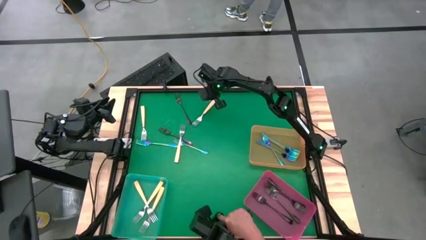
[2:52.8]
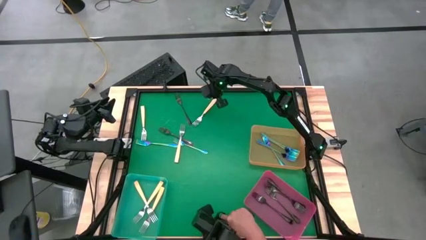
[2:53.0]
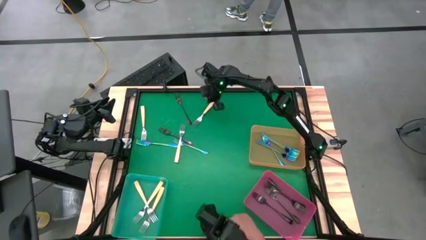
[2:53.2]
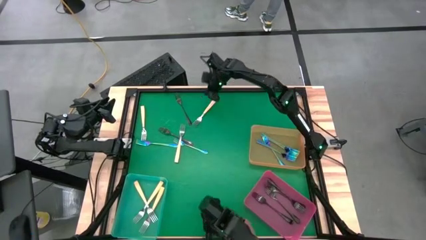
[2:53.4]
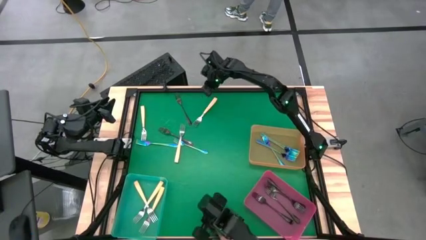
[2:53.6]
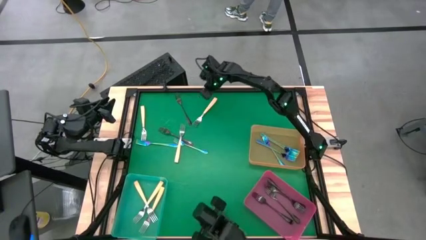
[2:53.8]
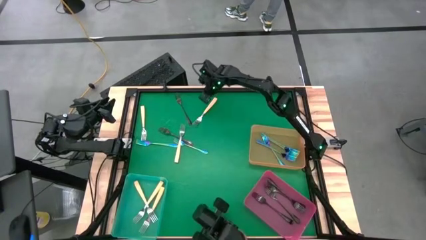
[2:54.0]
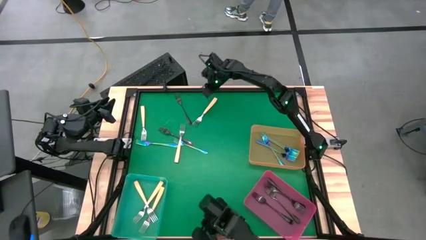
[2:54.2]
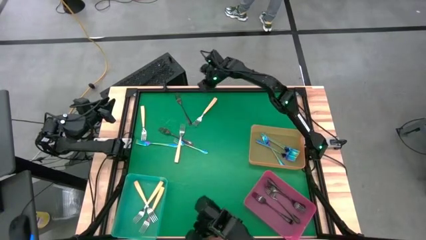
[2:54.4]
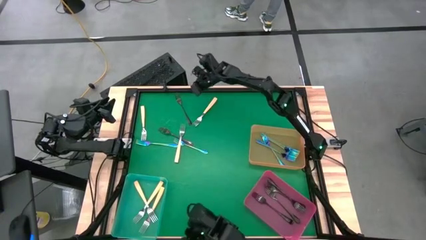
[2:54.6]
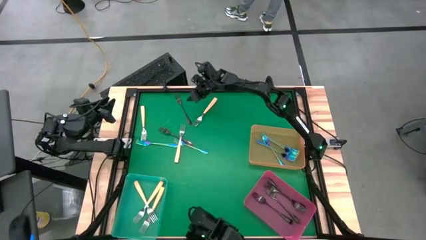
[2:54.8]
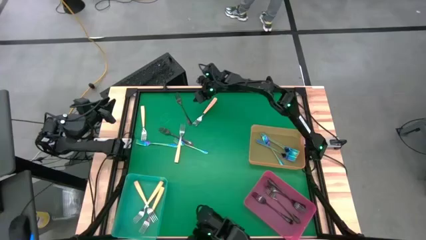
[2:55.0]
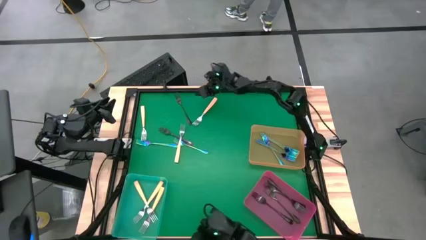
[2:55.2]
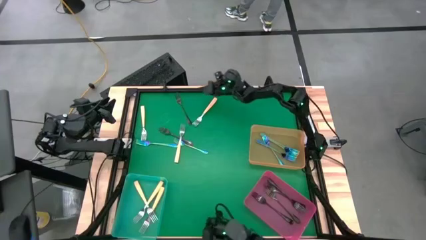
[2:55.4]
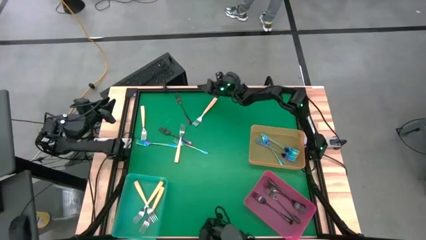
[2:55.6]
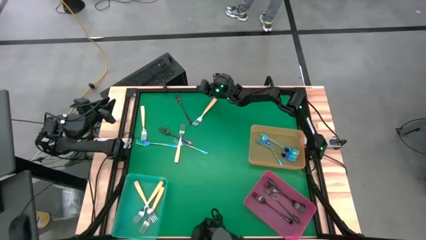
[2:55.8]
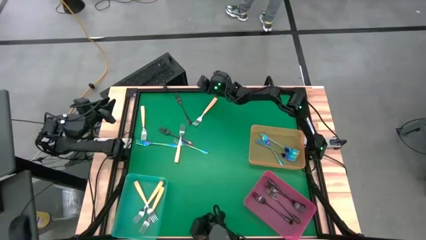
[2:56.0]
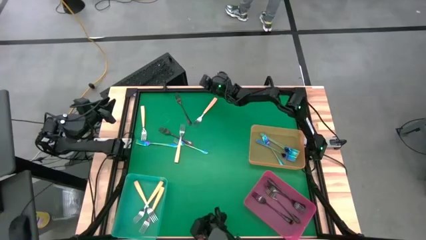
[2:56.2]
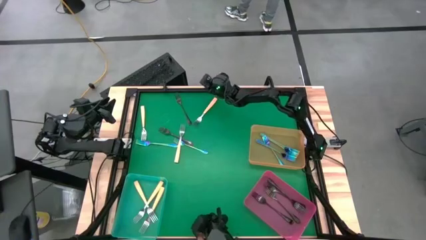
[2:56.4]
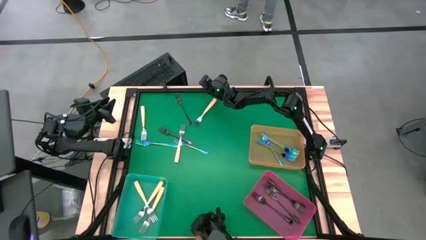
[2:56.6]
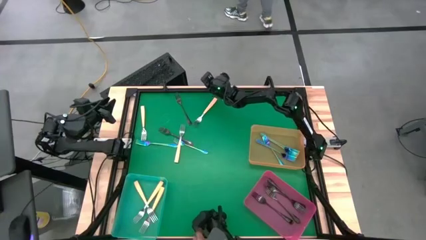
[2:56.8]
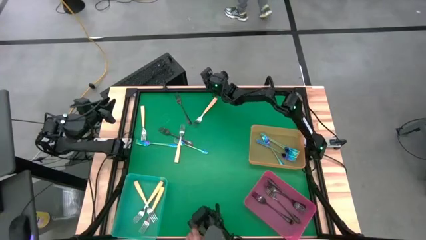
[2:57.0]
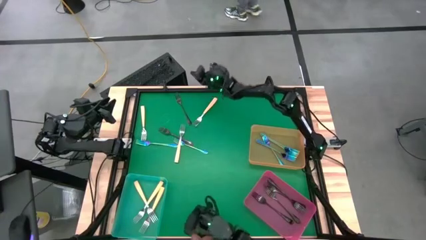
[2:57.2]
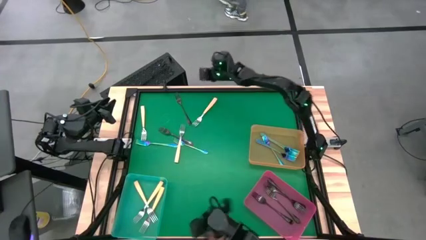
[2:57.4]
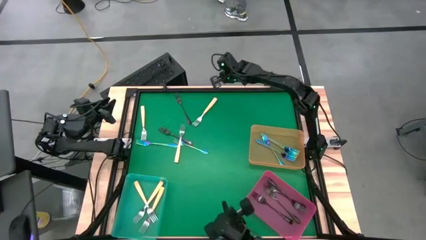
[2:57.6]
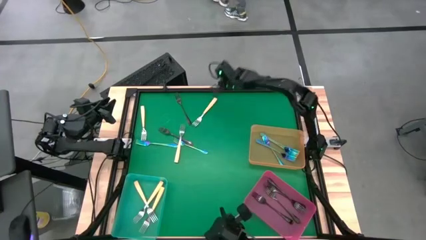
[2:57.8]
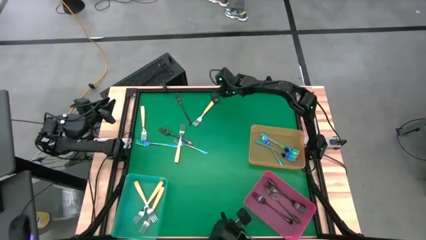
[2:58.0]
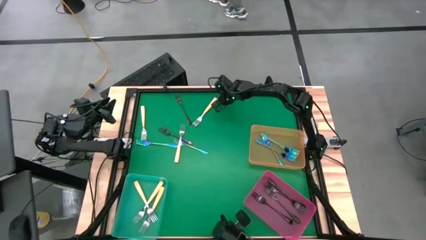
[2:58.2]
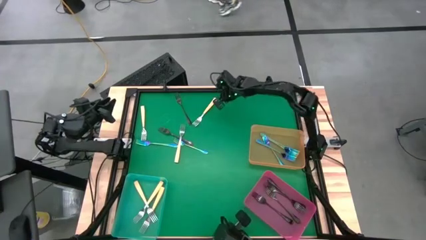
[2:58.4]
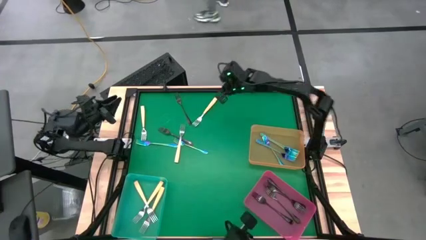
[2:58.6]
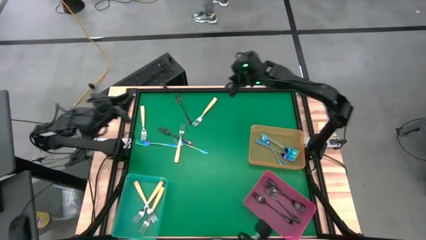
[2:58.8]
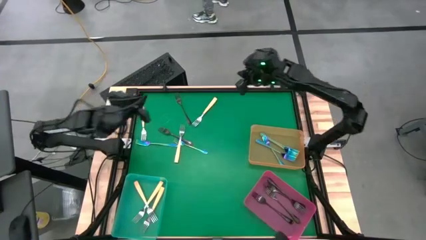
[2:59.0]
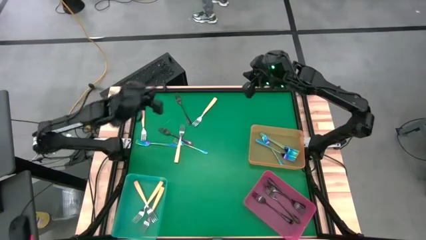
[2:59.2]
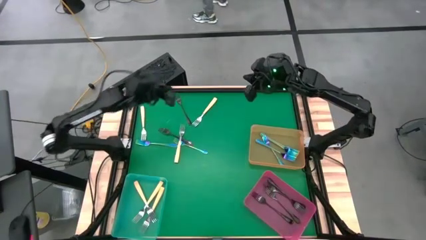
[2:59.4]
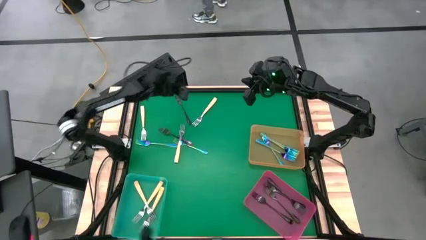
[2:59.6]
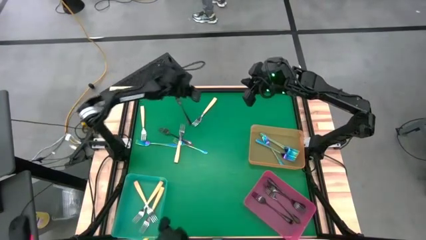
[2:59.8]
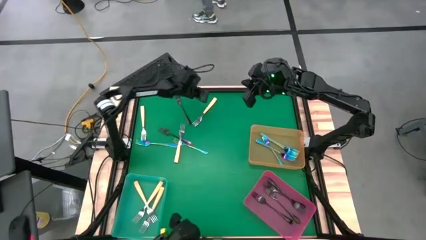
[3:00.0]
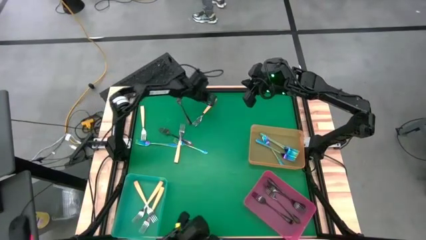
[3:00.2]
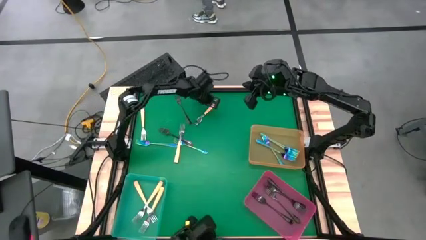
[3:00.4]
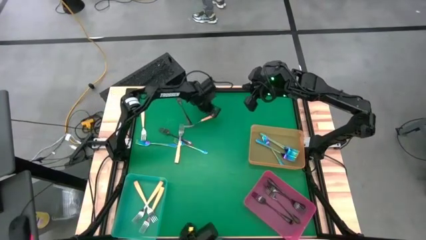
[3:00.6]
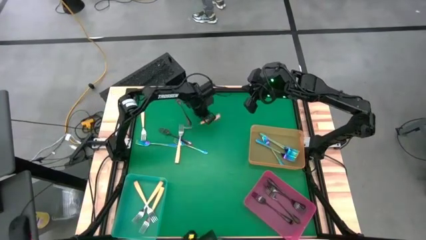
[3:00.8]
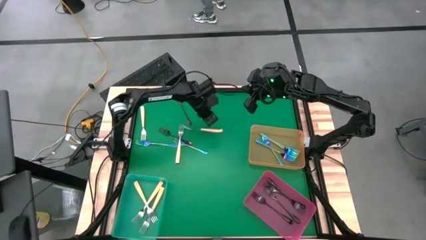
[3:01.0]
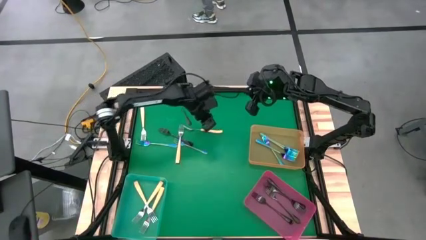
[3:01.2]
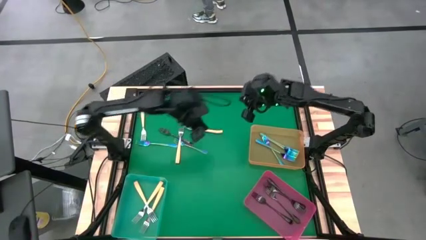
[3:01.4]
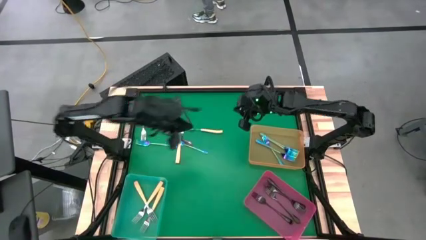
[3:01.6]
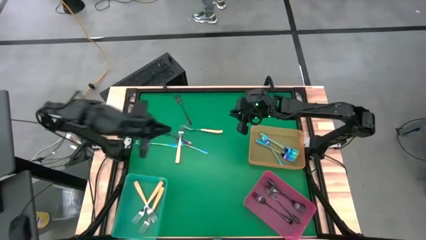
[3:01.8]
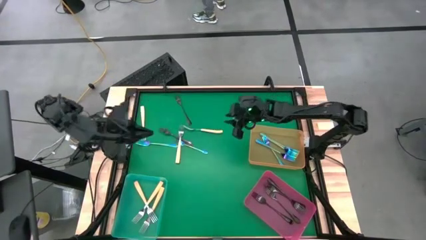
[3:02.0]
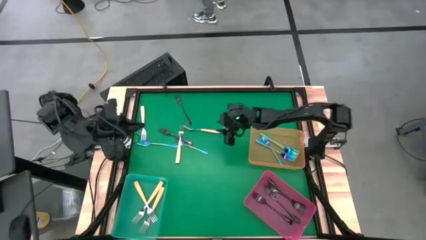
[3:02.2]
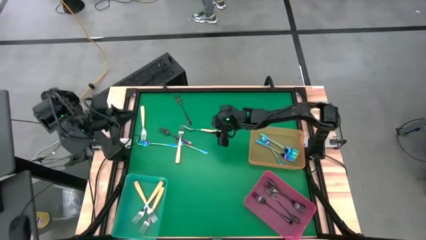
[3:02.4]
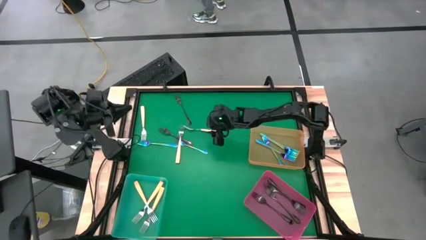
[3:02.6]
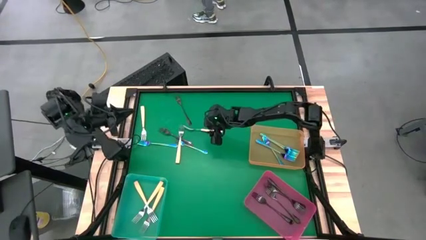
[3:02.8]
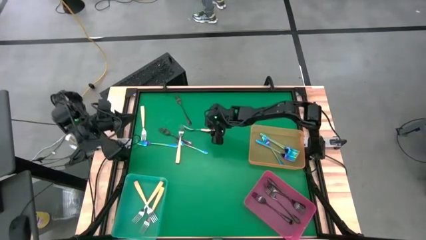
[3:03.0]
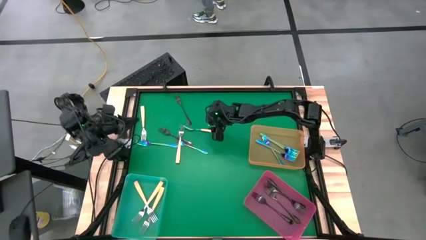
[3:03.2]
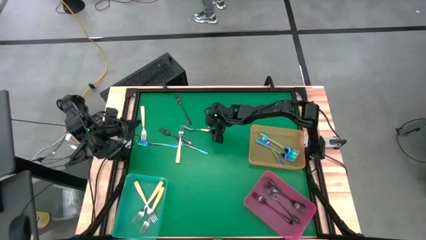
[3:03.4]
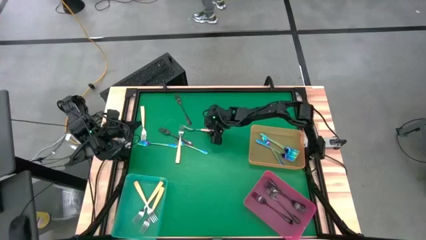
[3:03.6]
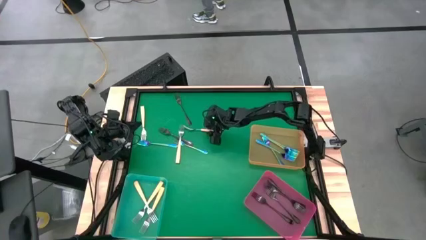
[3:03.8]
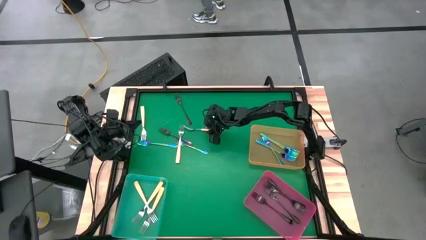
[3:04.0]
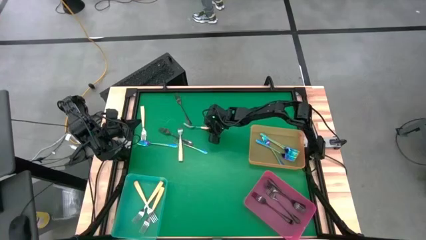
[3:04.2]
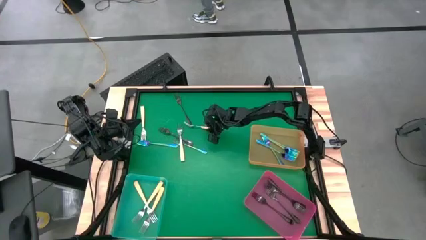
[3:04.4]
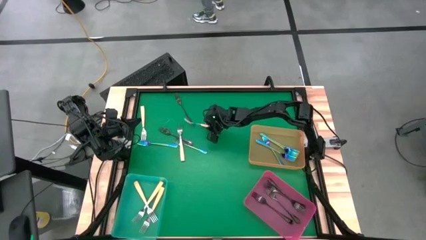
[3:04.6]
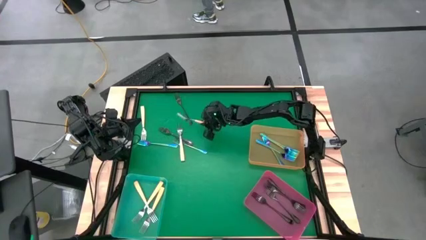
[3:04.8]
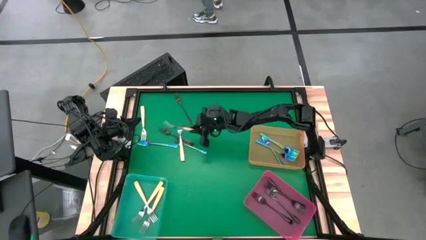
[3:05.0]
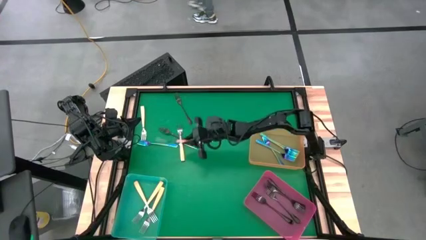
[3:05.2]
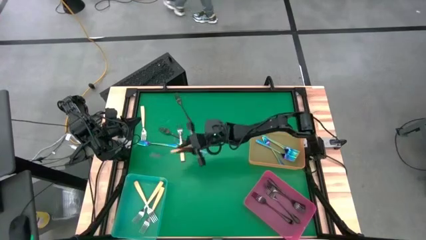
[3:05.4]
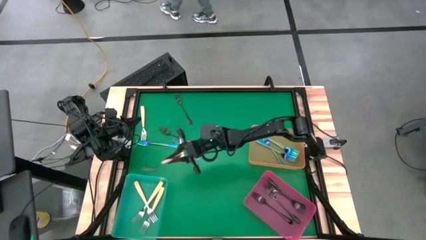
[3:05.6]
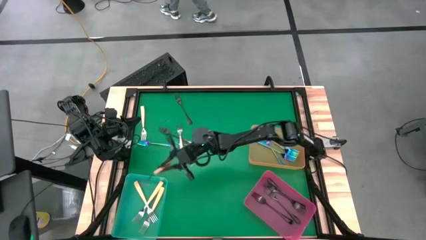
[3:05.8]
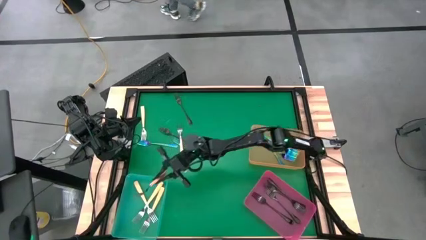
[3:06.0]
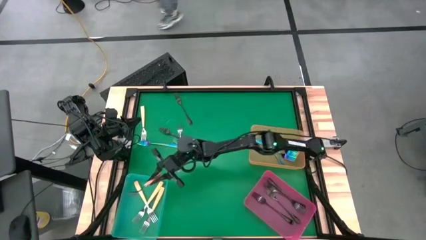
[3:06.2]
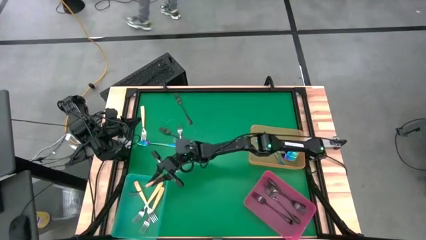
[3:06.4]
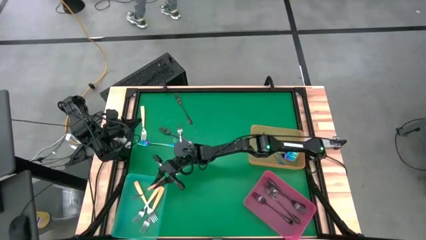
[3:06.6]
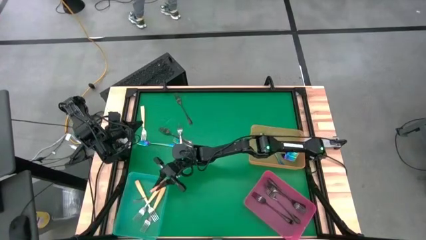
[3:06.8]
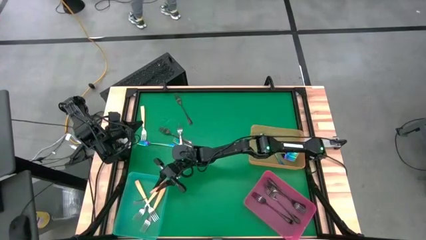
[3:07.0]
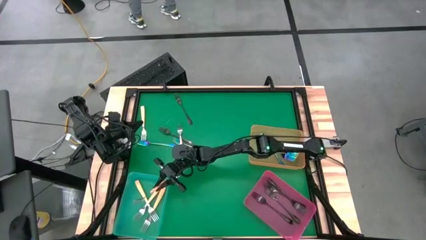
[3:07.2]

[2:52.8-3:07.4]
Task: Sort silverware by color (type)
Put the yellow fork into the blue bin

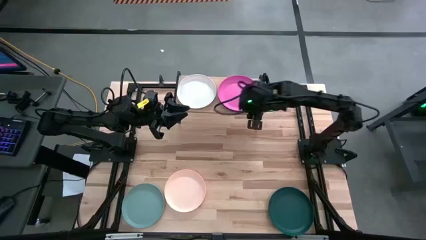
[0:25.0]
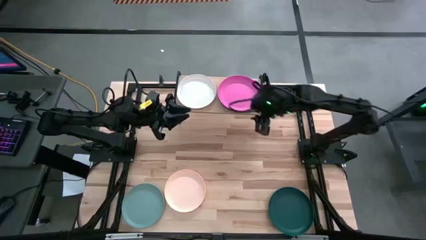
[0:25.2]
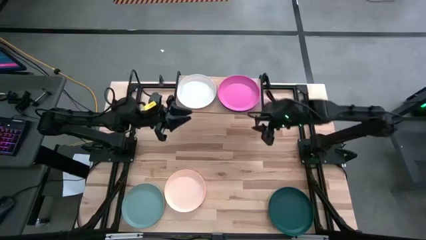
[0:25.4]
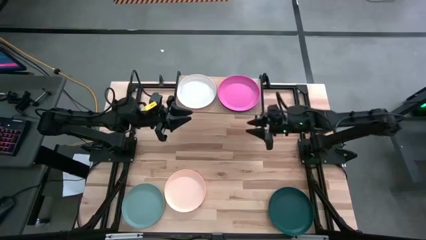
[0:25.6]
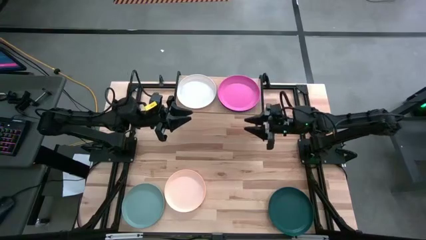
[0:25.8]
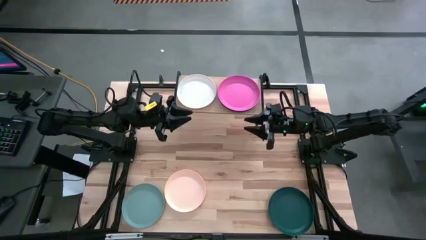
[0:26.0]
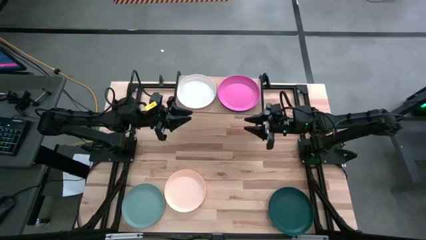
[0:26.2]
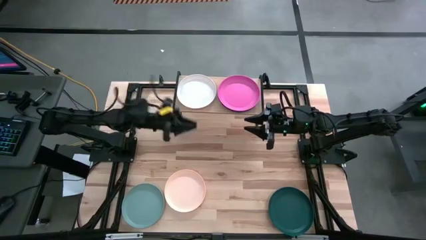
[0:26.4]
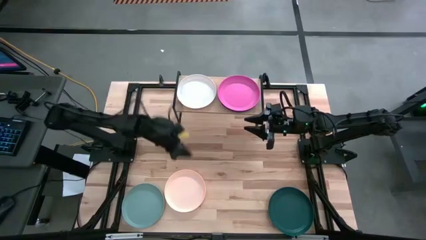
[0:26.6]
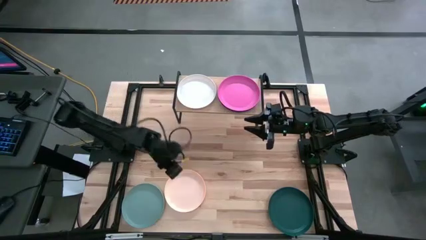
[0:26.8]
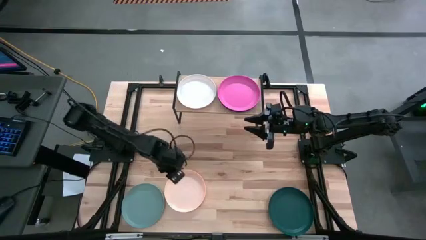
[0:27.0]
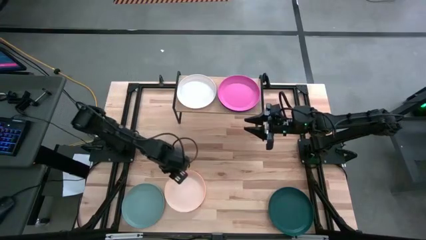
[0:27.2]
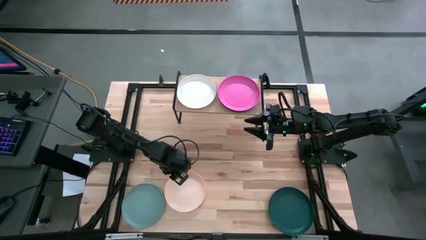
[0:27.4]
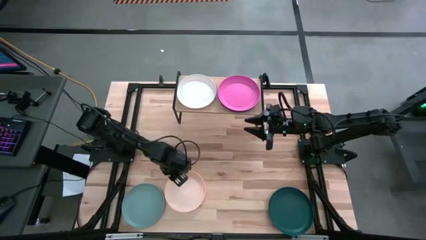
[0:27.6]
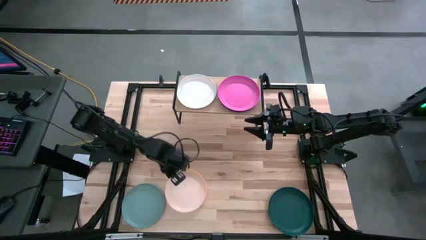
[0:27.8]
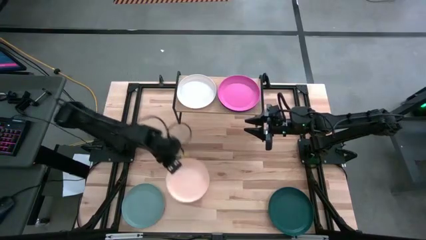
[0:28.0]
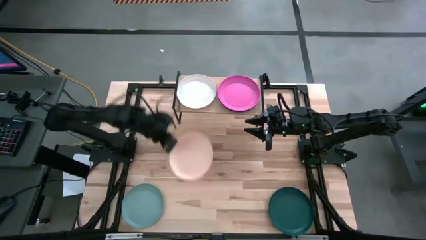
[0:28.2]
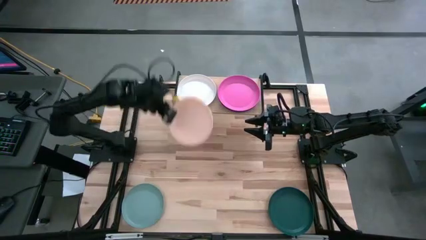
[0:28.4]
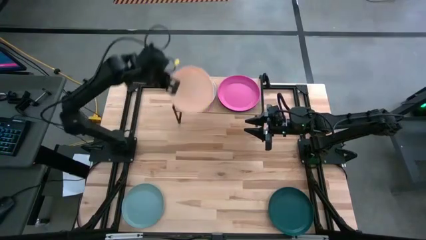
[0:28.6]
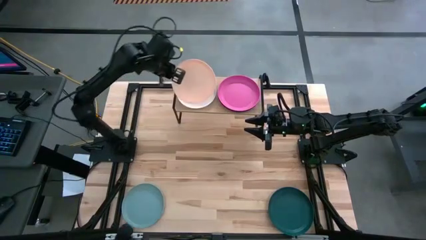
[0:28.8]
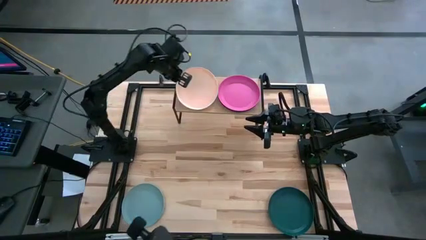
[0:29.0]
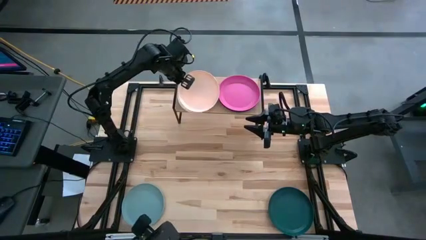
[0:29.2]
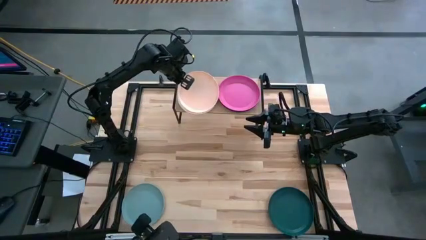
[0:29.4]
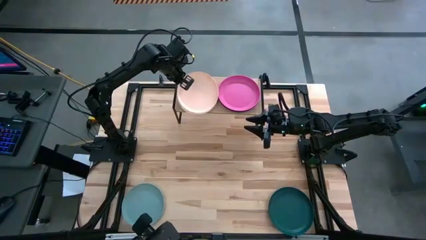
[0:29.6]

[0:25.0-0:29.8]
Task: Place and stack plates onto a shelf
Stack the peach plate on top of the white plate on the shelf
